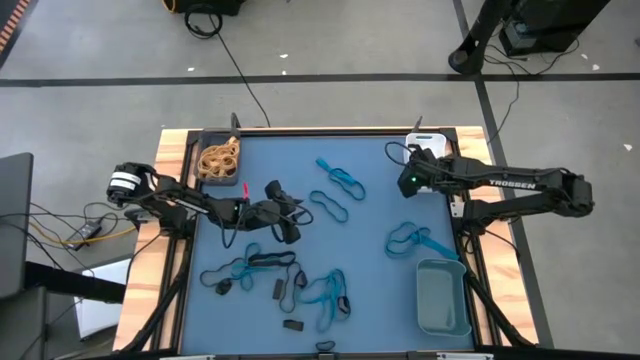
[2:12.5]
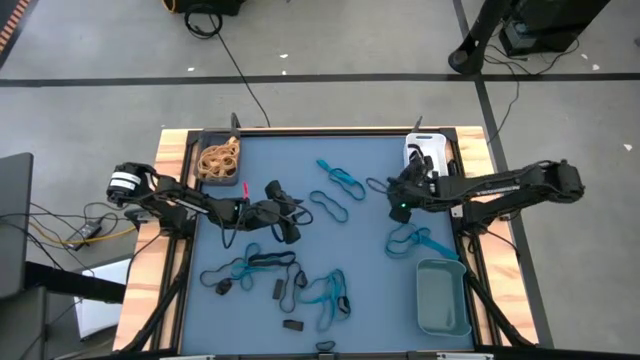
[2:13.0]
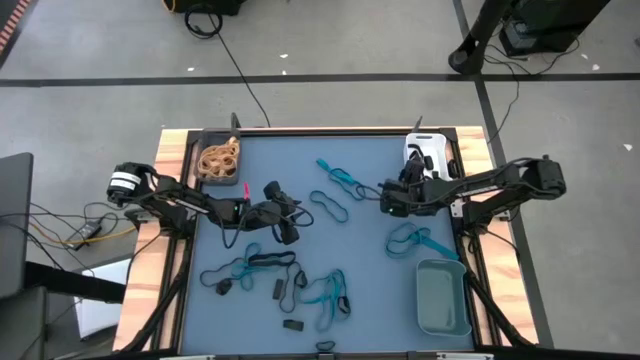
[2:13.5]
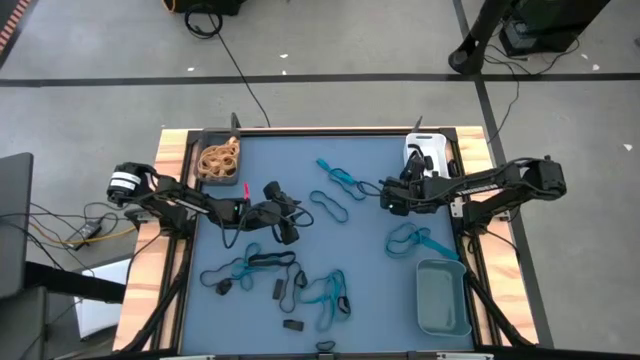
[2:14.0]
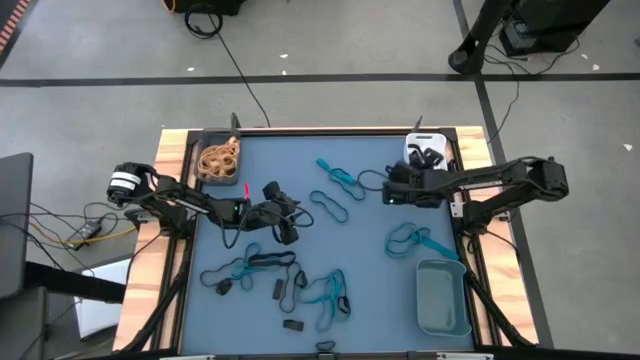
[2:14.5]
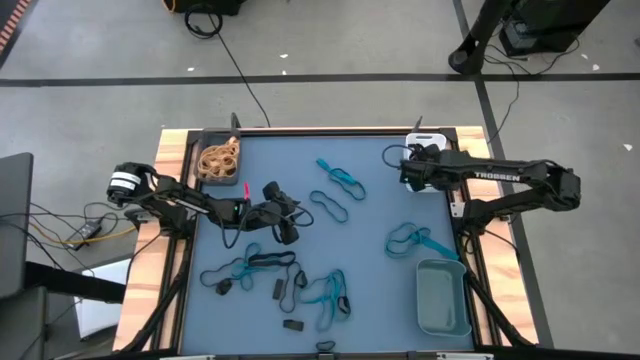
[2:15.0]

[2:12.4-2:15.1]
Task: Sort rubber bands into baskets
Adjust the black rubber band in the white bin

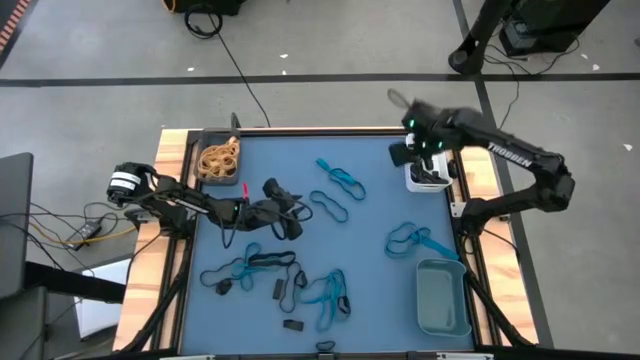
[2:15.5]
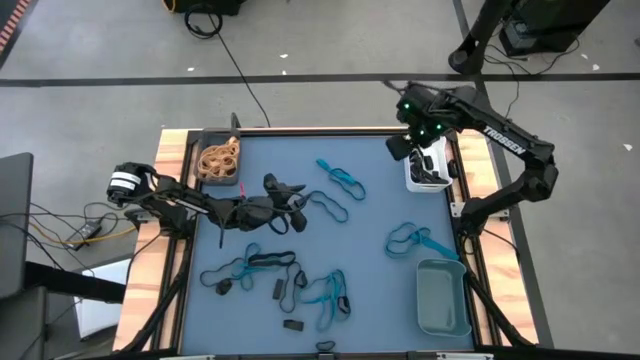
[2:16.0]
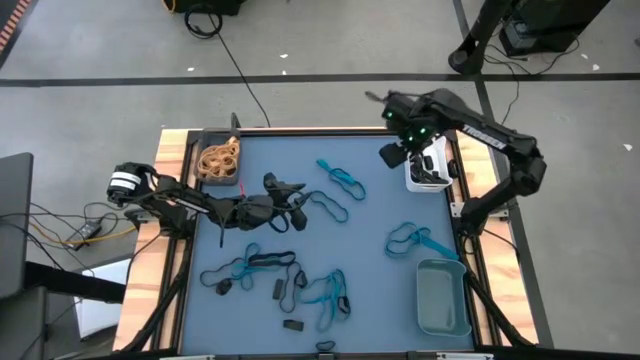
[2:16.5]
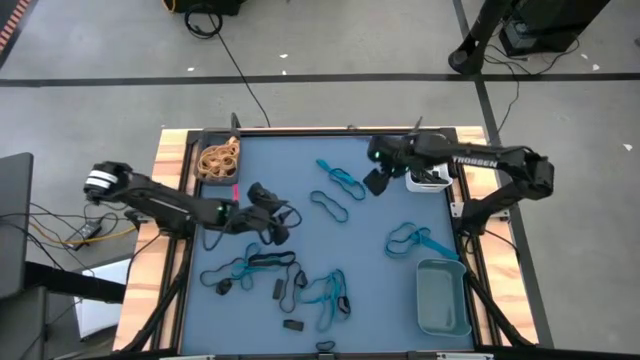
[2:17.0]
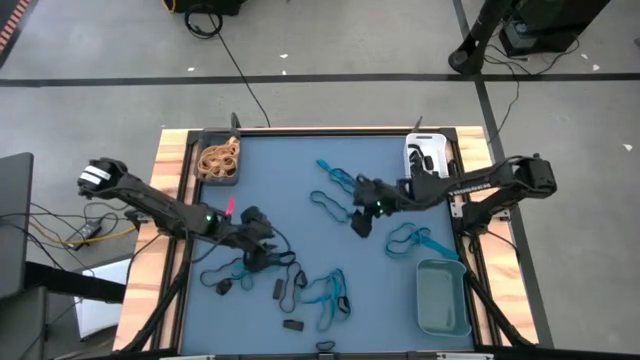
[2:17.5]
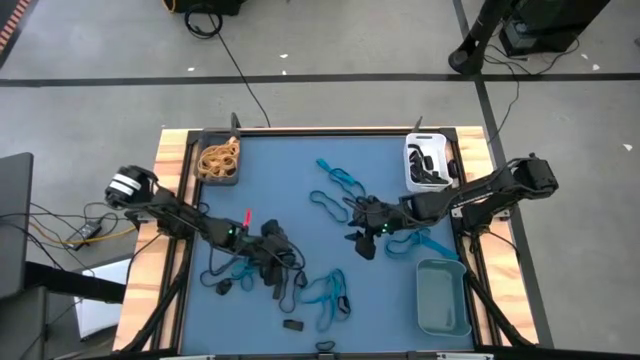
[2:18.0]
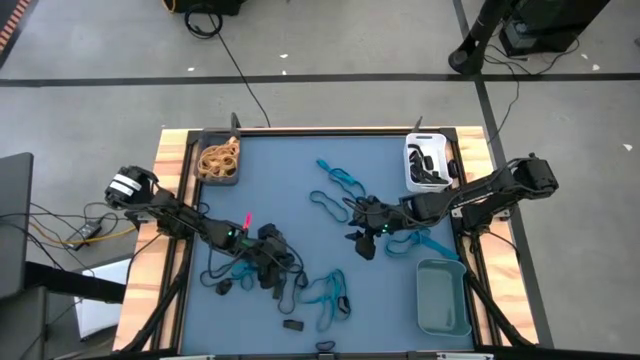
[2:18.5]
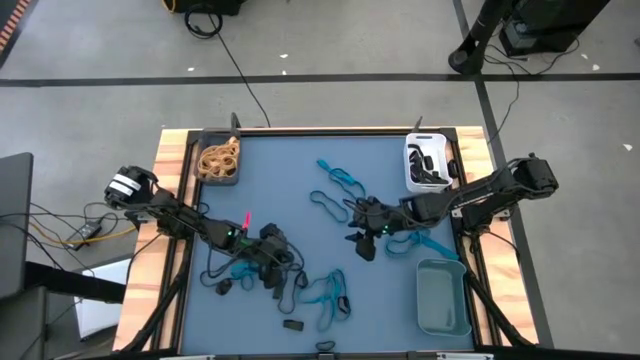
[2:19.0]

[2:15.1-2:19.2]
Put the black rubber band into the white bin

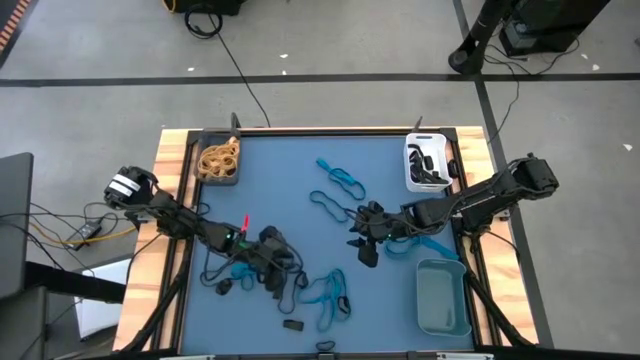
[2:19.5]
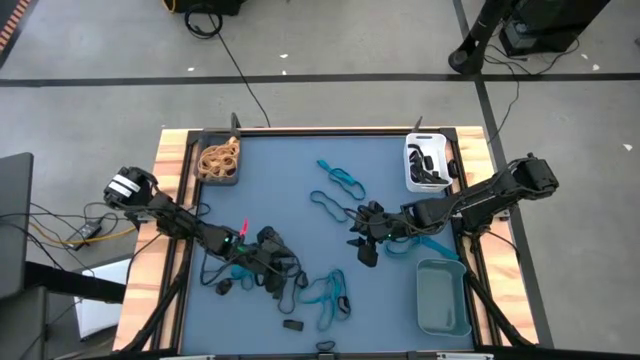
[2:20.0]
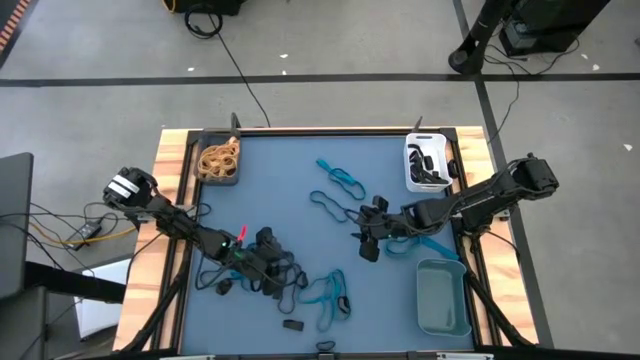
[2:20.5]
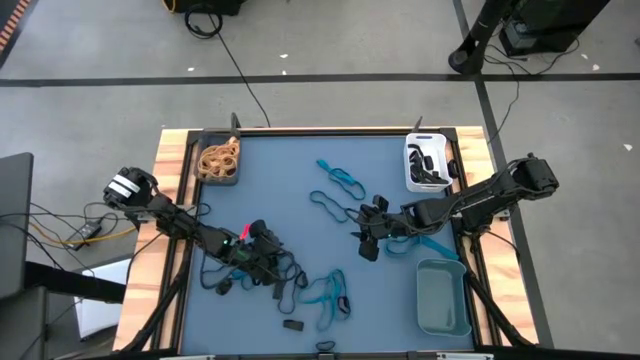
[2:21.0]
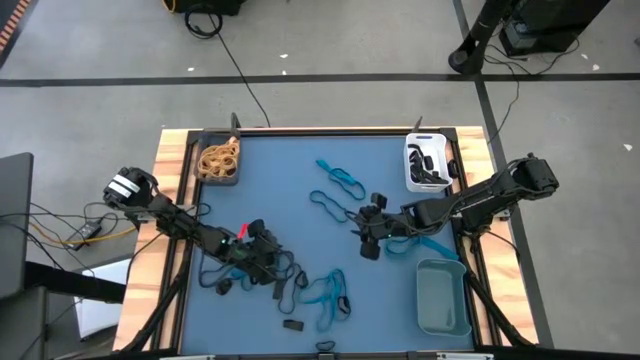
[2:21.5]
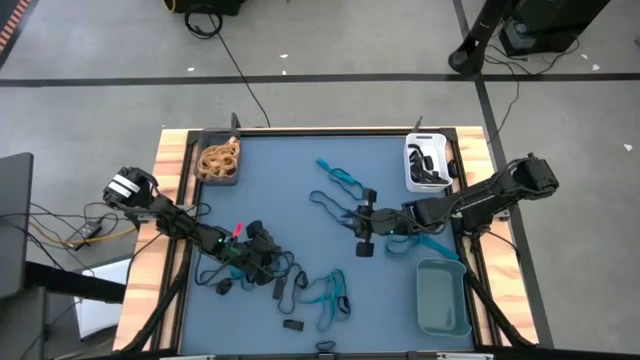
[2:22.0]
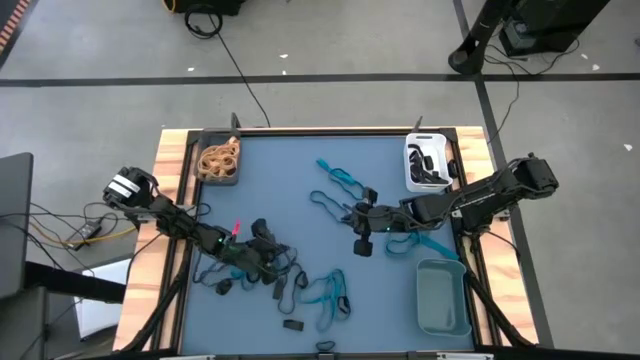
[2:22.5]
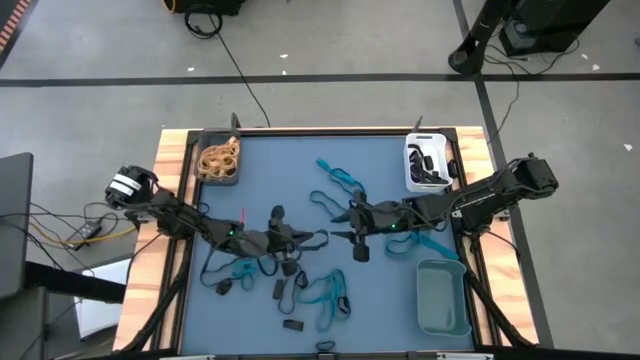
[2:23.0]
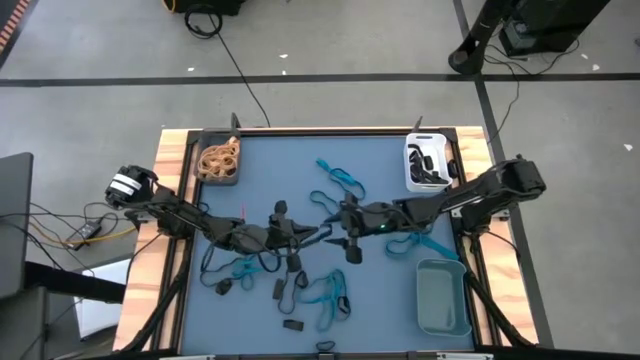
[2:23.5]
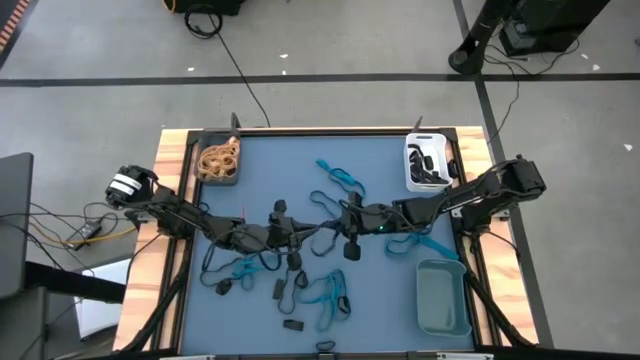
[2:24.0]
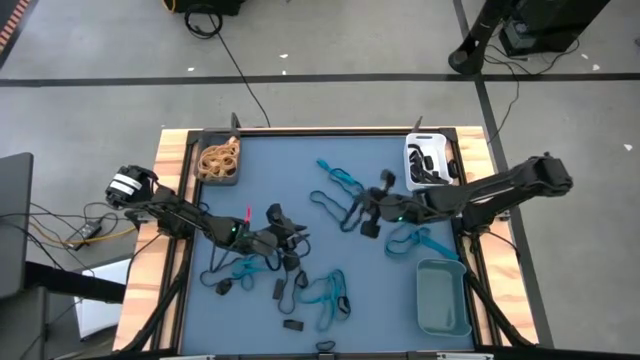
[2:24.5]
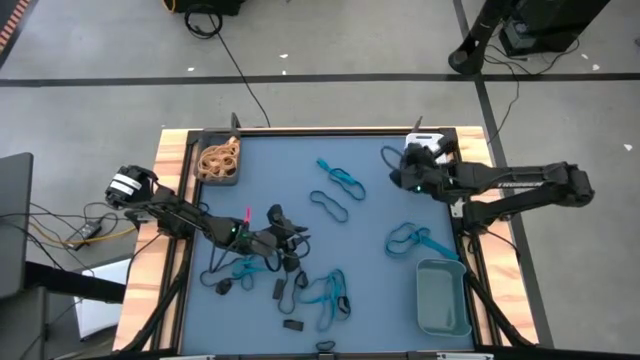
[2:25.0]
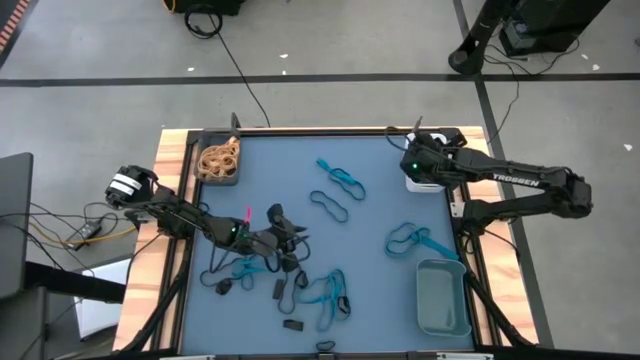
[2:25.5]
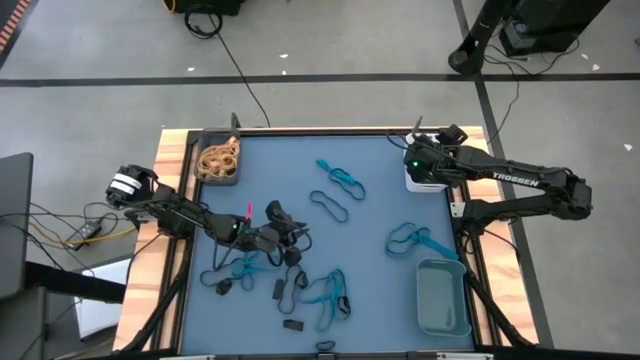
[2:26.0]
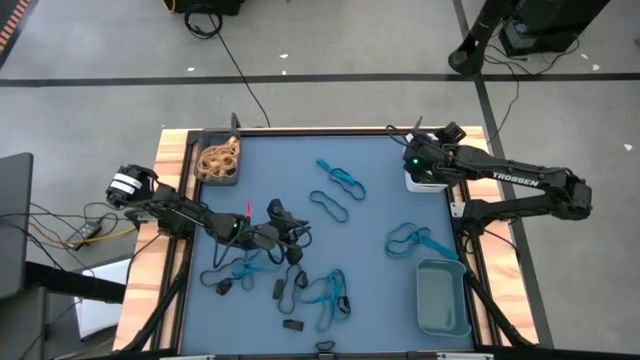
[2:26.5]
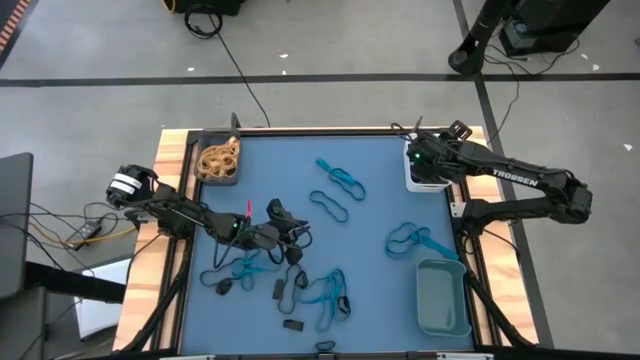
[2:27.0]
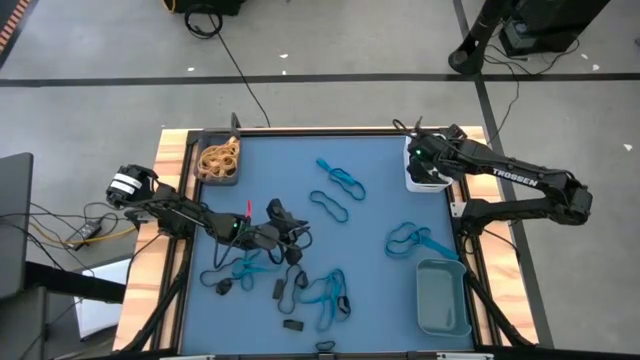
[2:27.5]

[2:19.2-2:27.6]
Put the black rubber band into the white bin

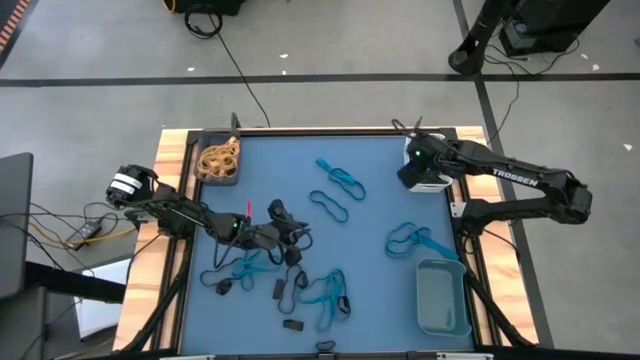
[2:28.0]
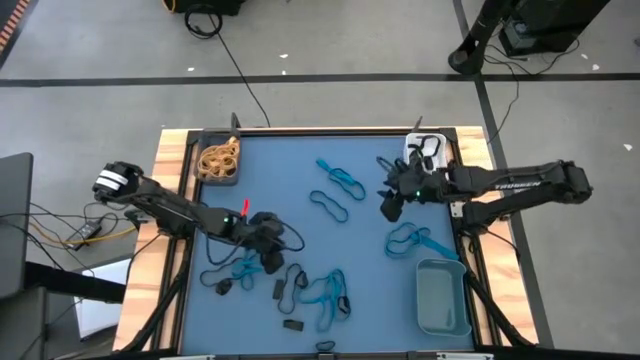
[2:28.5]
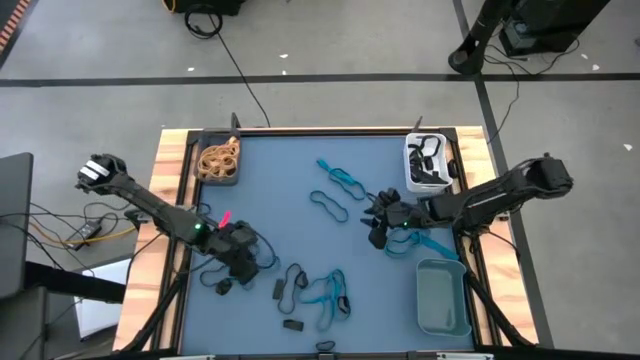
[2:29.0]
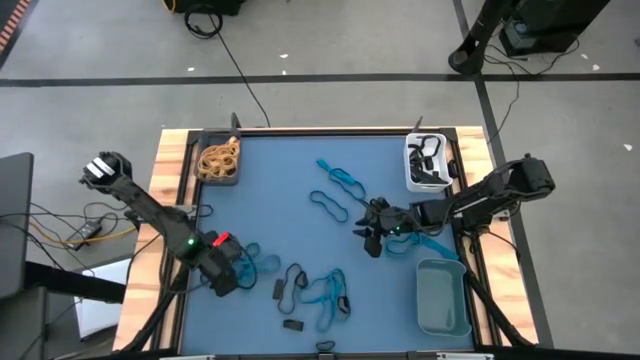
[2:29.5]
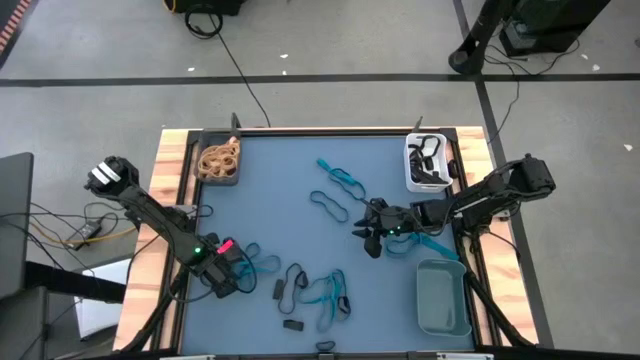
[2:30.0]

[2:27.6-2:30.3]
Put the black rubber band into the white bin

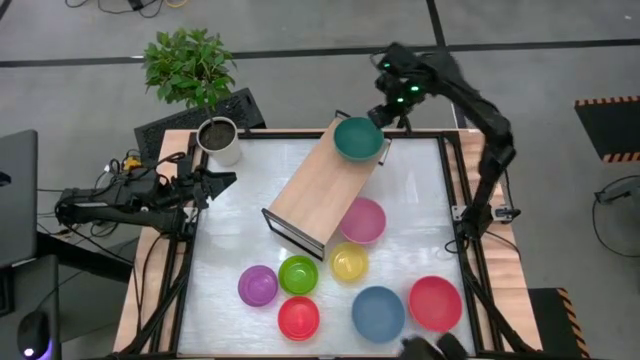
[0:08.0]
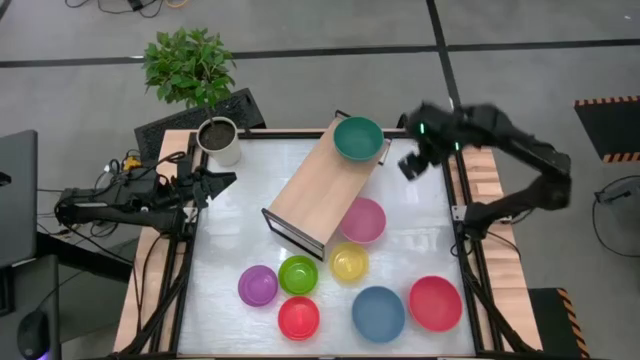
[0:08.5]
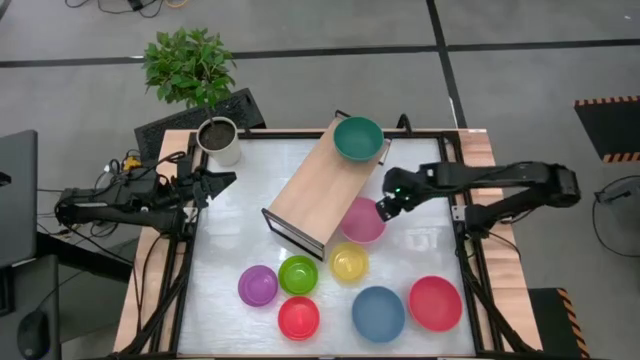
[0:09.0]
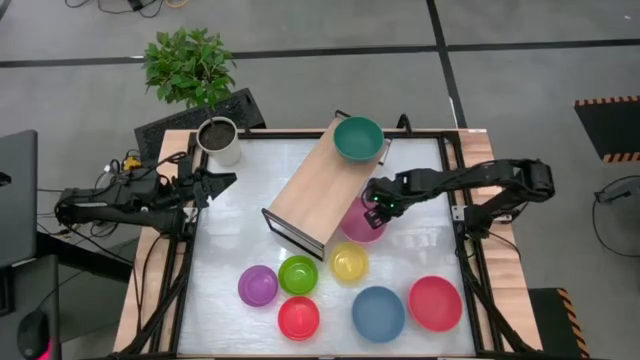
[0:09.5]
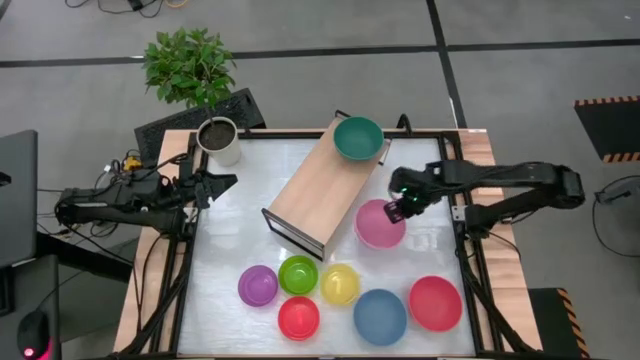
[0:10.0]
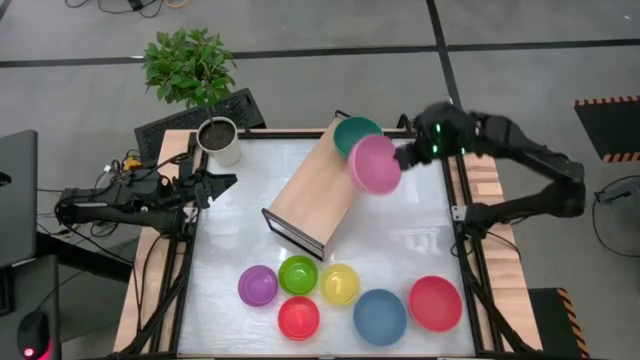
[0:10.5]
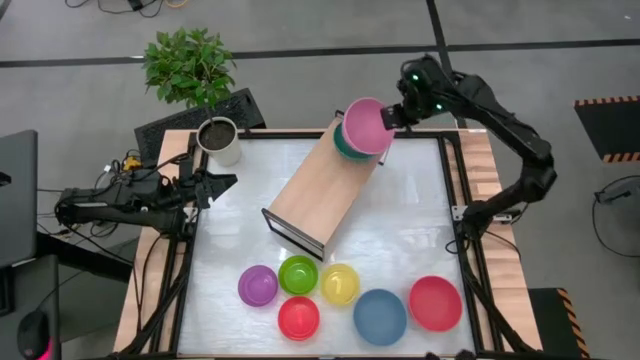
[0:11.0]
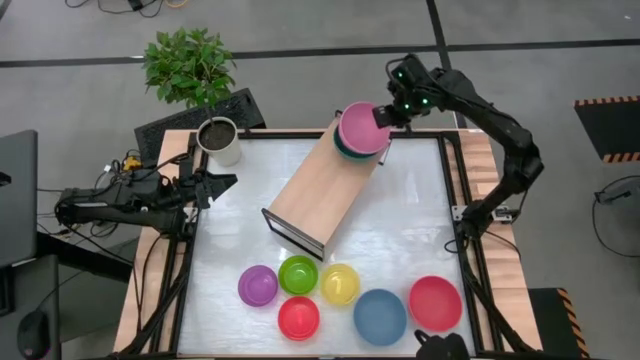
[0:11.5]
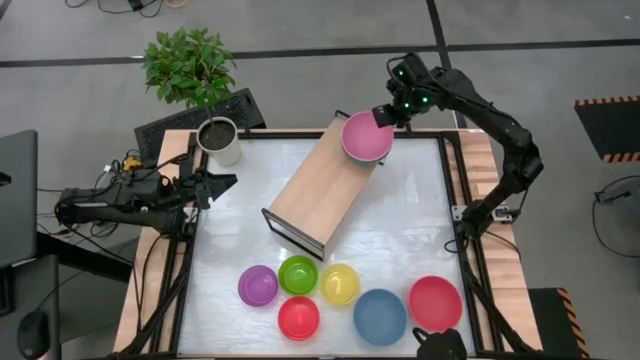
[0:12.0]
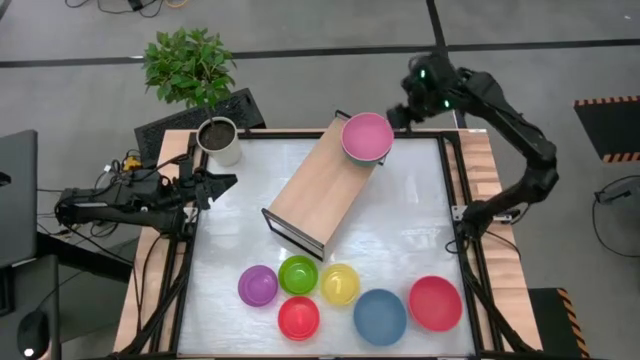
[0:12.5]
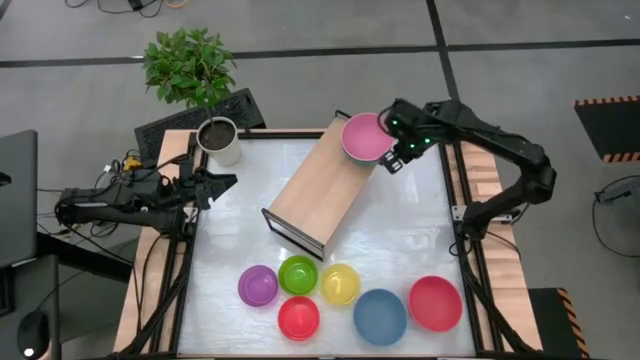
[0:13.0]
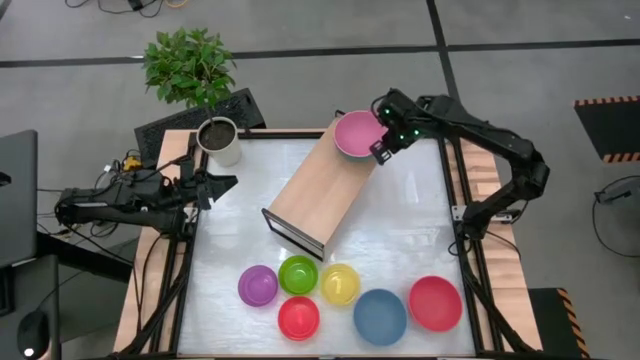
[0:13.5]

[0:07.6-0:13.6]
Task: Place and stack bowls onto a shelf
Stack the pink bowl on the green bowl
